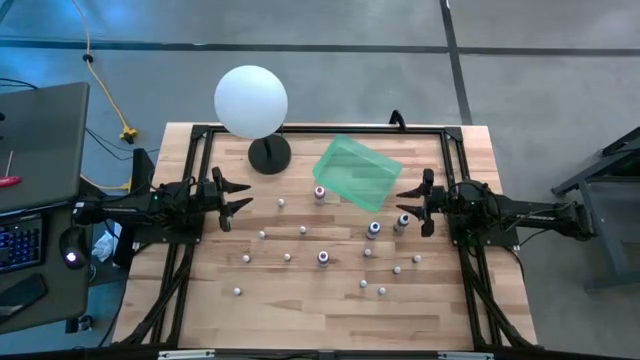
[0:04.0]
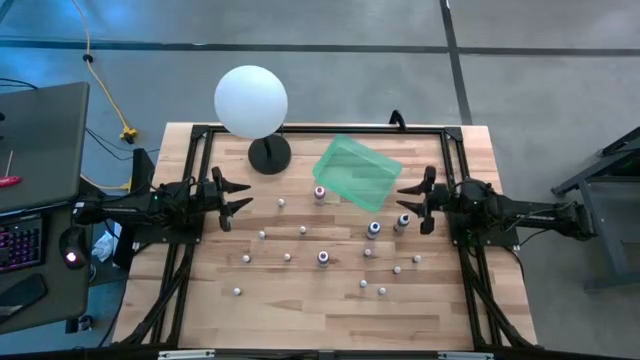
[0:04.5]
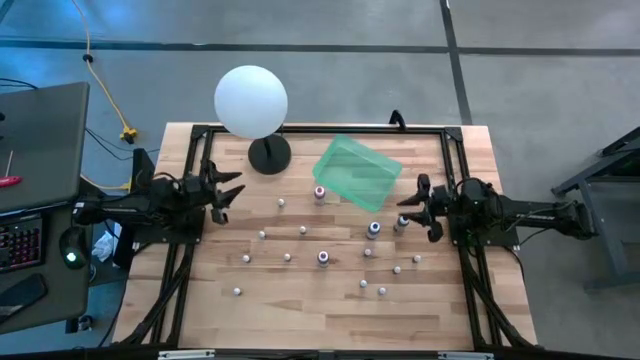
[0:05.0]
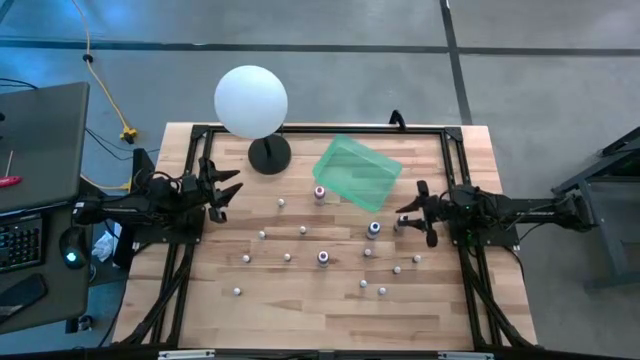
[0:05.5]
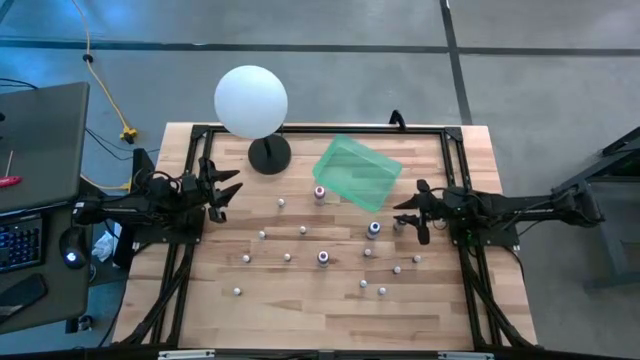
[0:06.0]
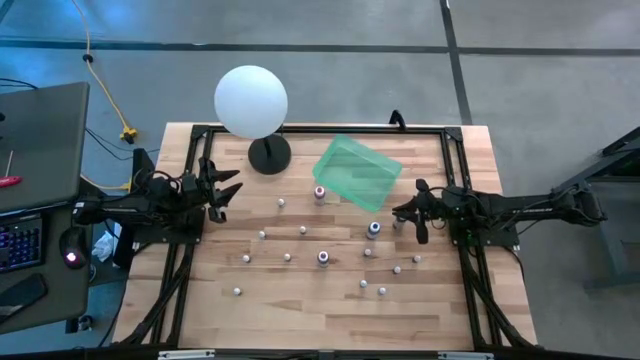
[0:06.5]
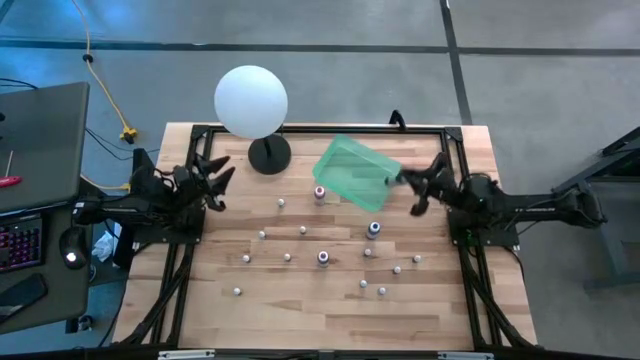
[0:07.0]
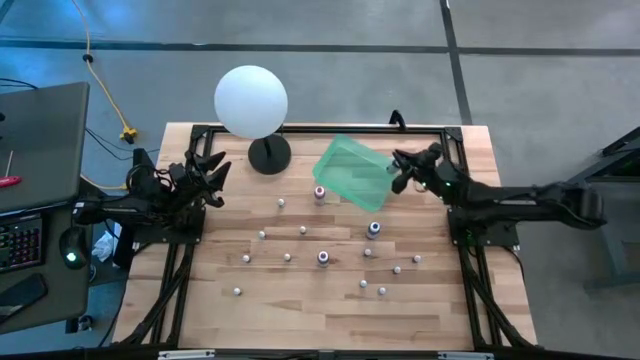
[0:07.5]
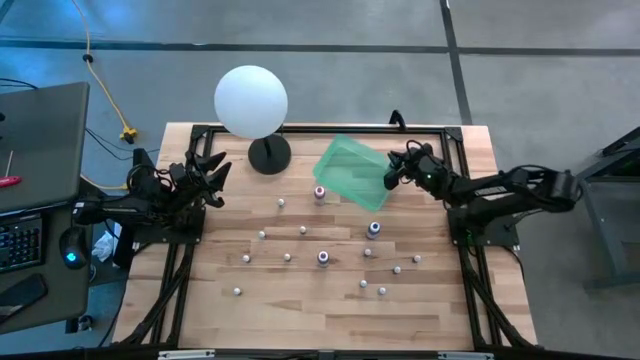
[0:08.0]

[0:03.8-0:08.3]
Task: Pick & Place food coloring
Put the large black food coloring bottle into the green bin

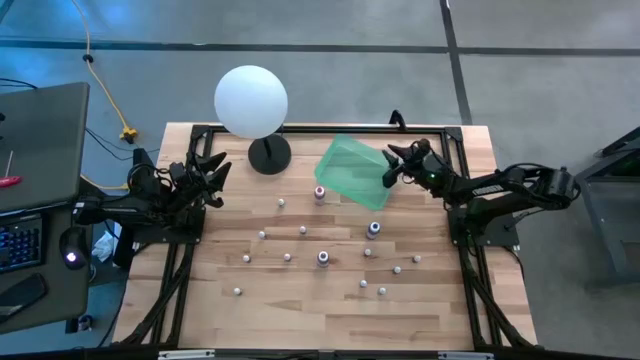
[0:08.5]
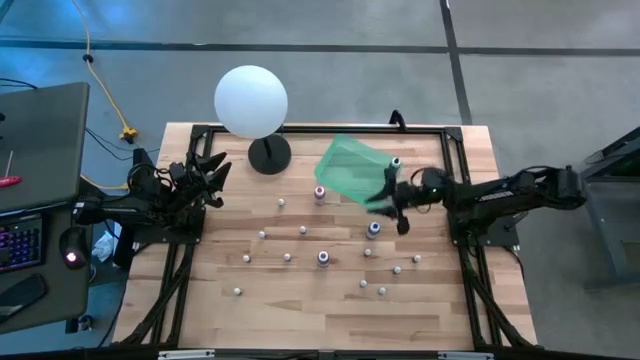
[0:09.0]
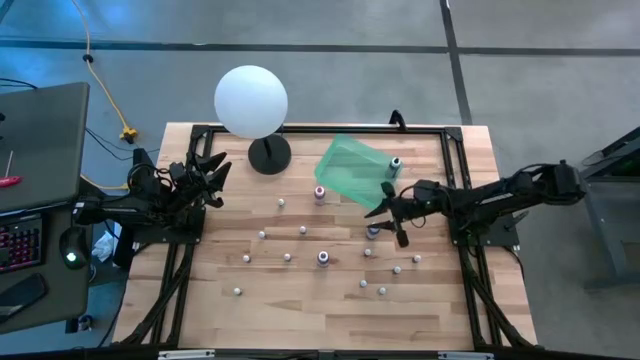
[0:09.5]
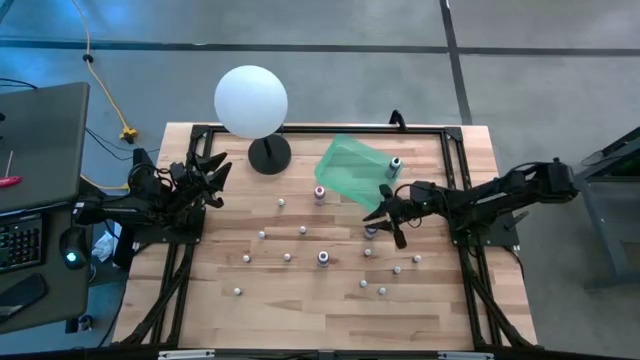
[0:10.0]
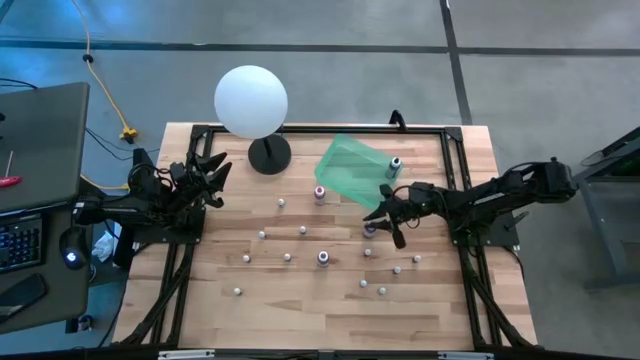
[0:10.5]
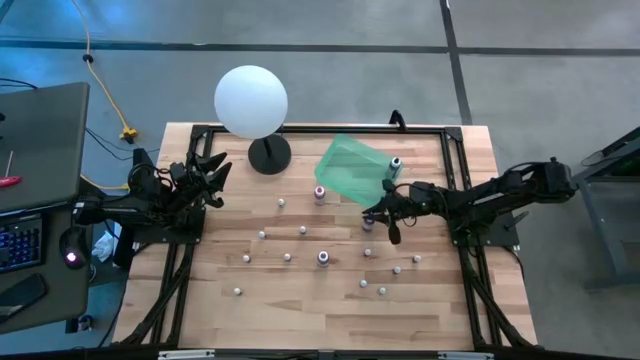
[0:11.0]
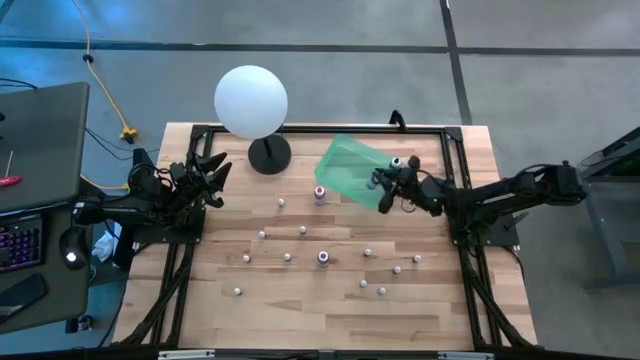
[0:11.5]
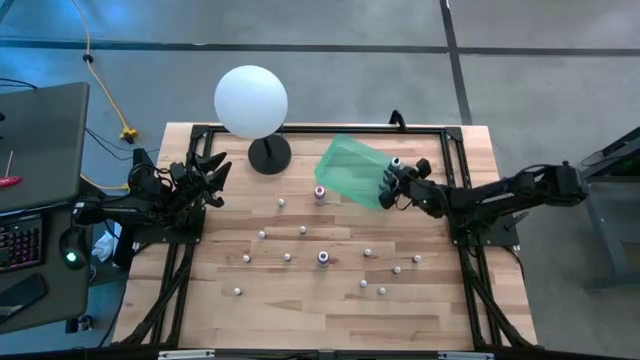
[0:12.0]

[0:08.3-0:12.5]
Put the large blue food coloring bottle into the green bin

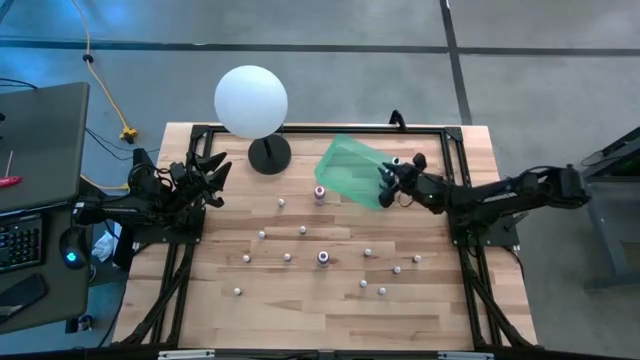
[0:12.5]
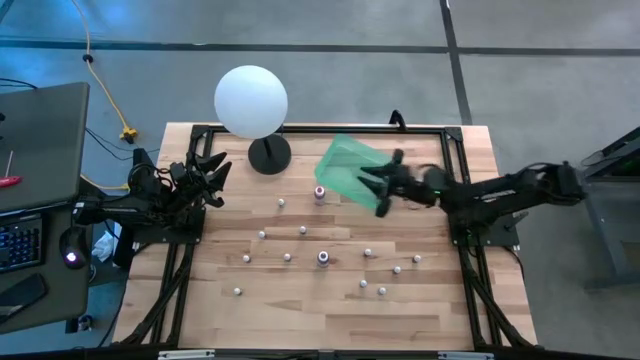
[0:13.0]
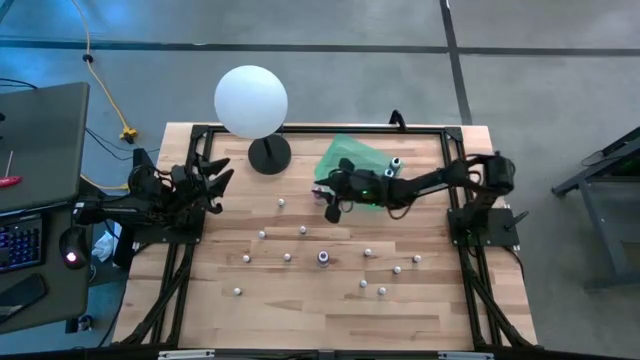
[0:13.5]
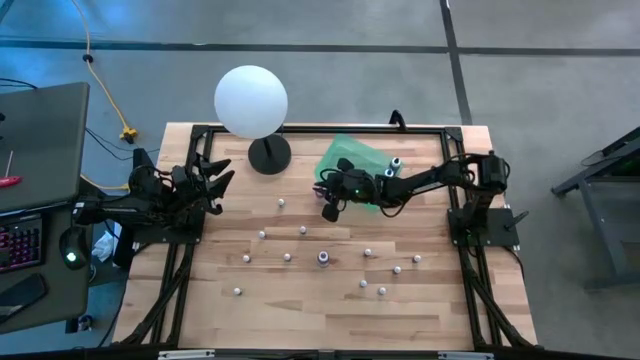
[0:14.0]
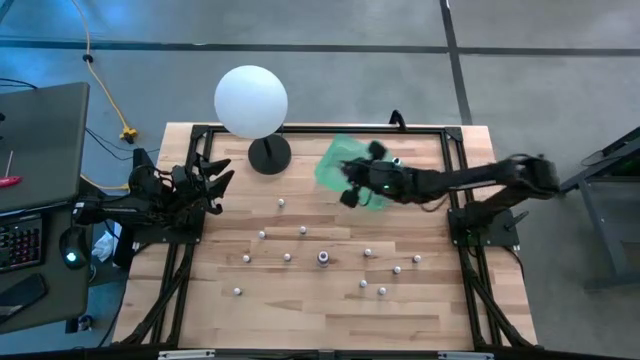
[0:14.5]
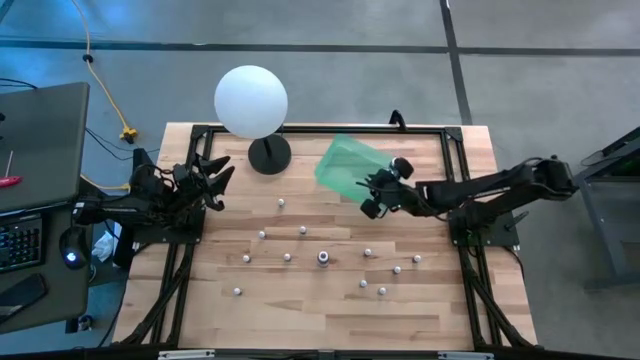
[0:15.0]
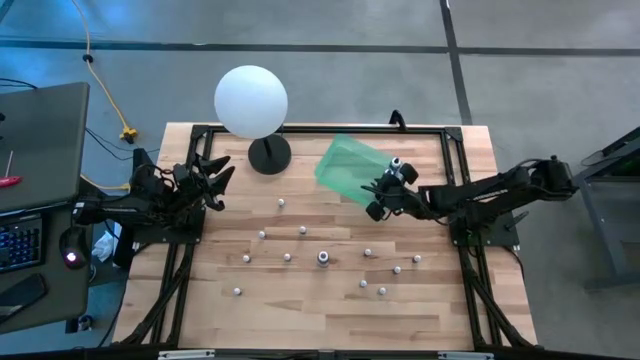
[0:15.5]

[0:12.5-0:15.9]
Put the large red food coloring bottle into the green bin

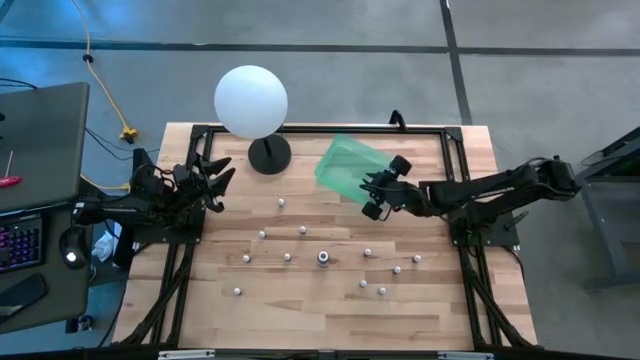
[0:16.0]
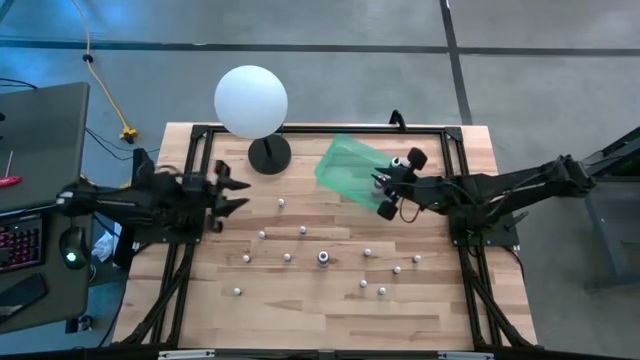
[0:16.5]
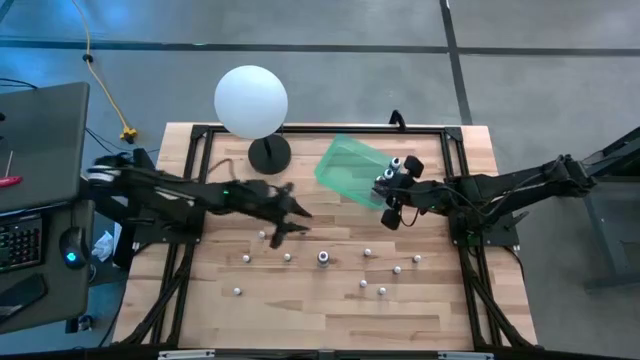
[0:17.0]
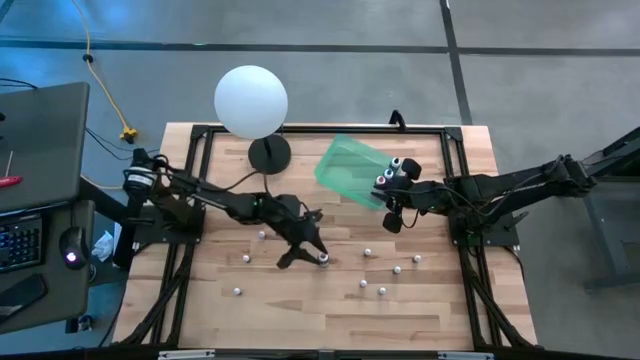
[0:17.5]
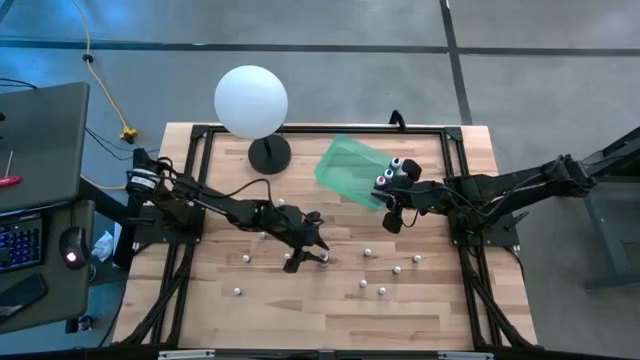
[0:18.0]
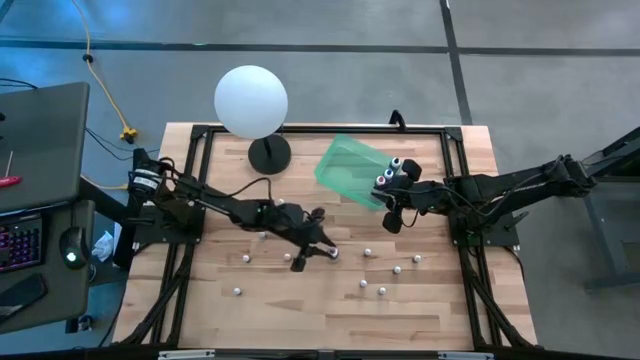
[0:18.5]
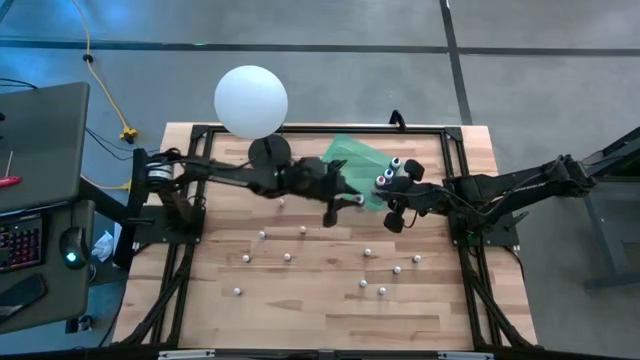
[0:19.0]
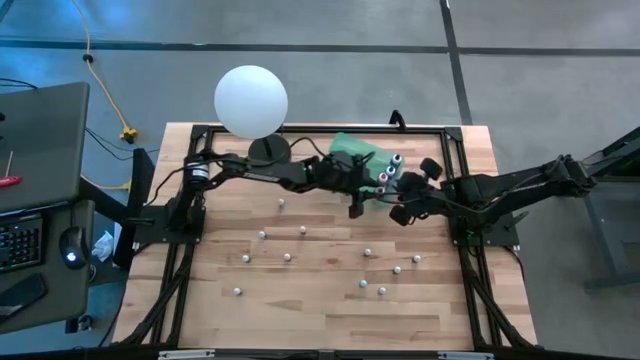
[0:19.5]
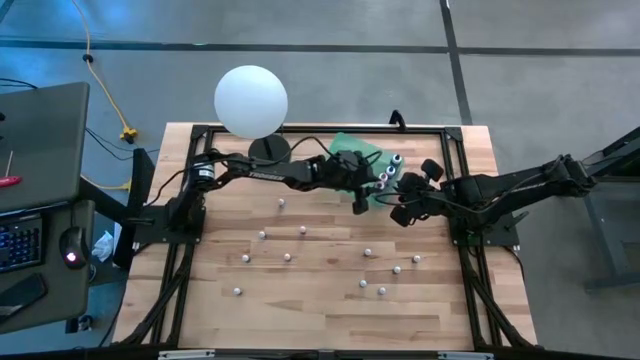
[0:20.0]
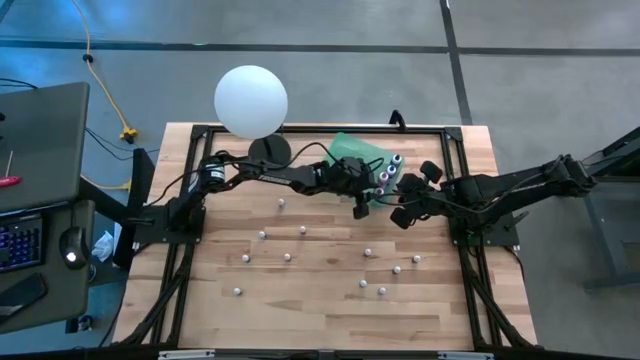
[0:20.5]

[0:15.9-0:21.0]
Put the large purple food coloring bottle into the green bin

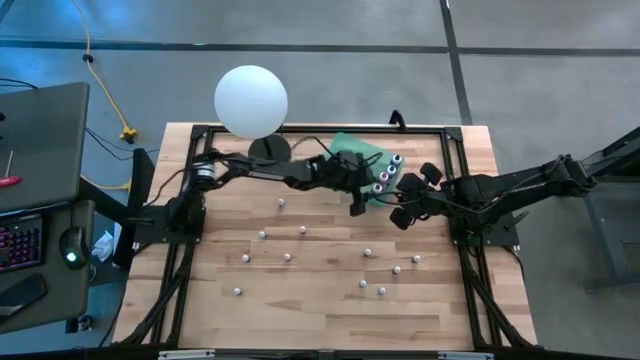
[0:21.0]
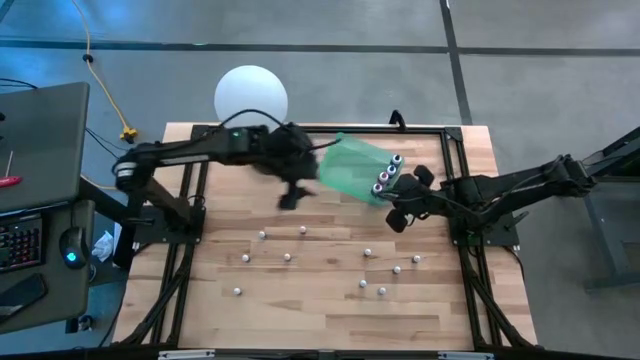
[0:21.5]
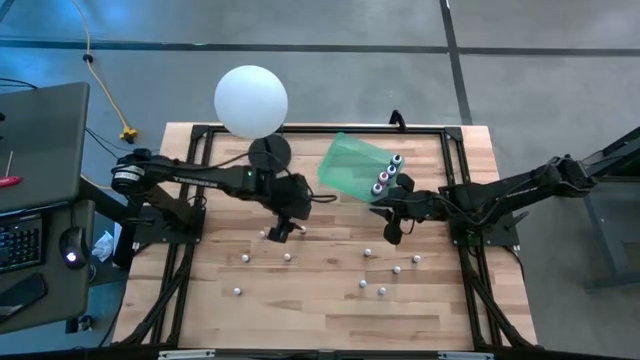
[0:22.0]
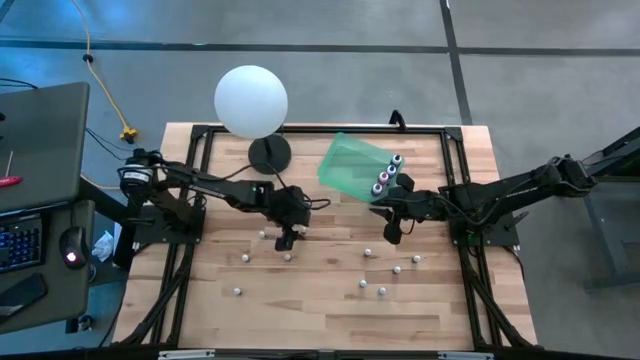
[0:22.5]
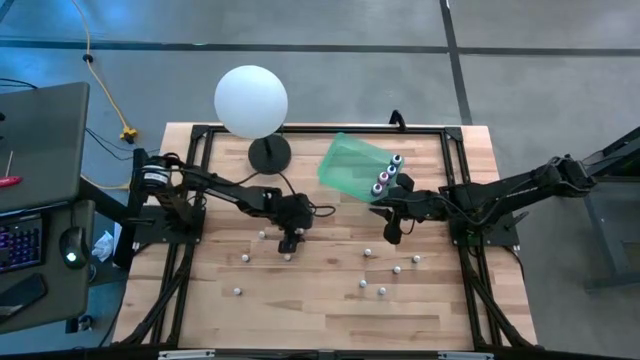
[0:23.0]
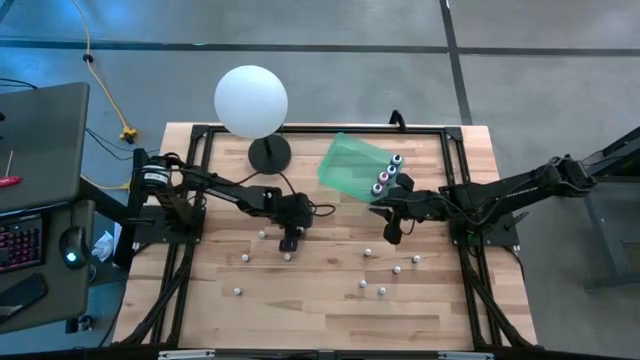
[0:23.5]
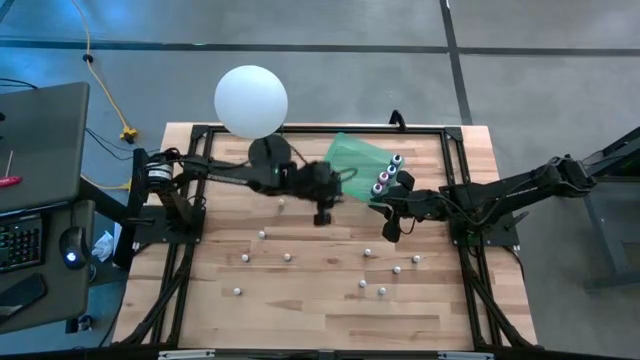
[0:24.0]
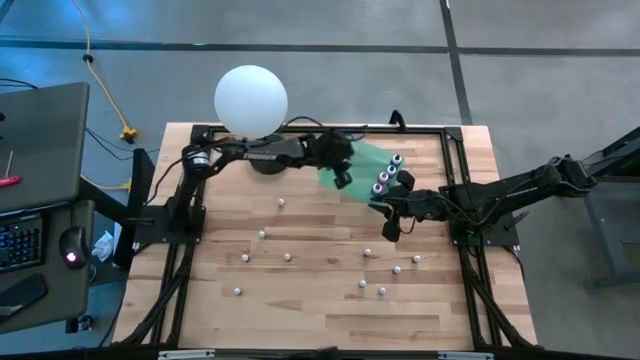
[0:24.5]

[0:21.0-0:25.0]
Put the small red food coloring bottle into the green bin
